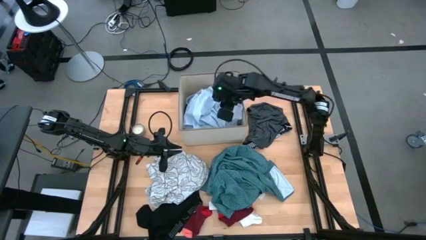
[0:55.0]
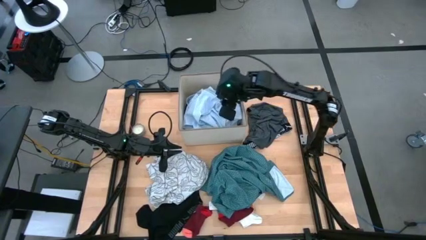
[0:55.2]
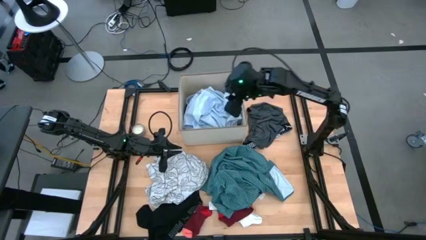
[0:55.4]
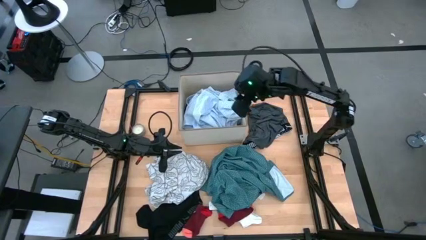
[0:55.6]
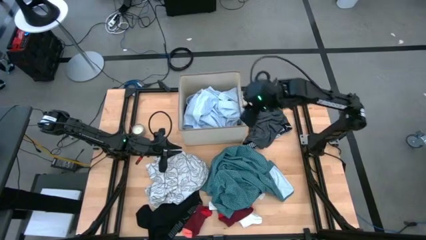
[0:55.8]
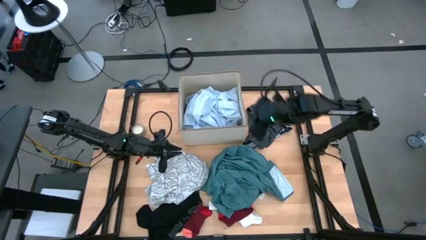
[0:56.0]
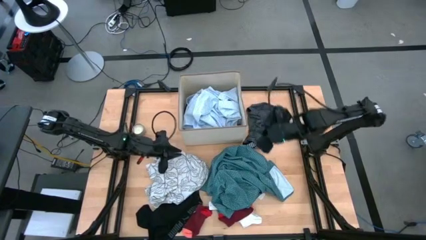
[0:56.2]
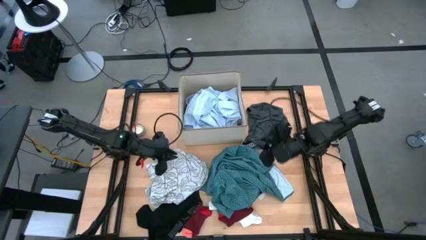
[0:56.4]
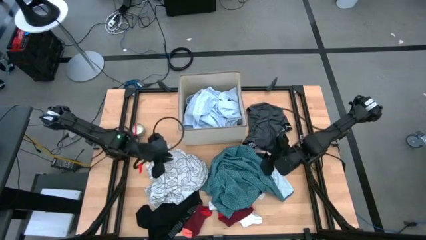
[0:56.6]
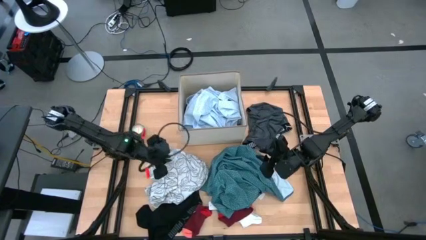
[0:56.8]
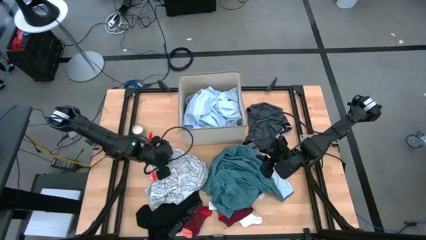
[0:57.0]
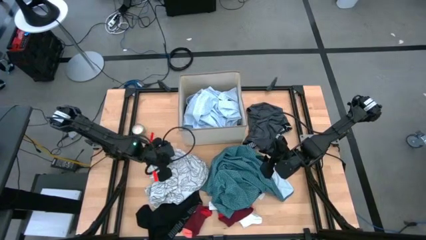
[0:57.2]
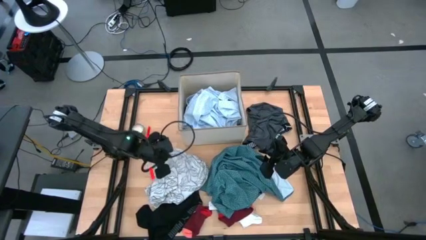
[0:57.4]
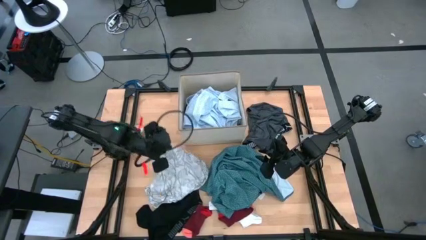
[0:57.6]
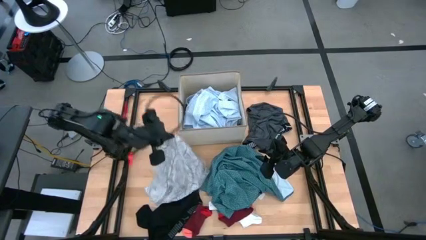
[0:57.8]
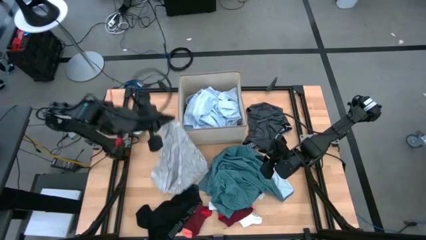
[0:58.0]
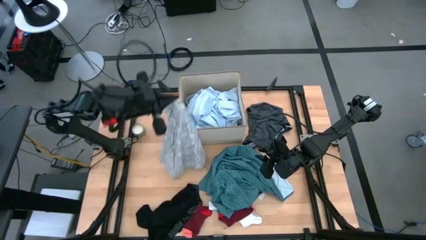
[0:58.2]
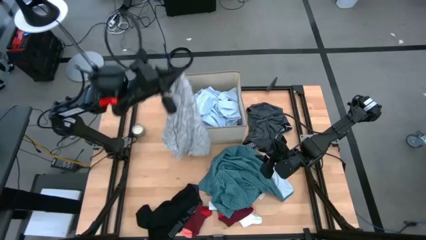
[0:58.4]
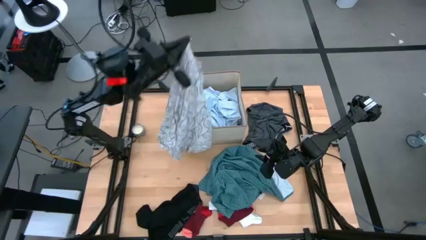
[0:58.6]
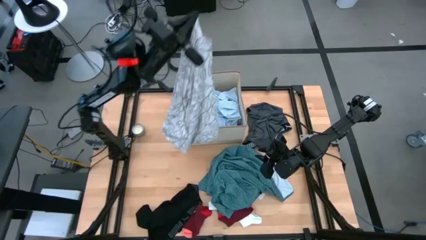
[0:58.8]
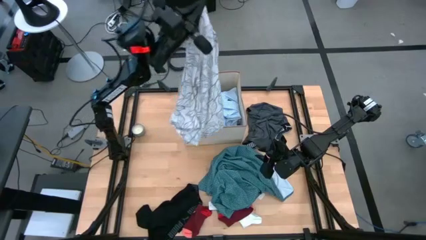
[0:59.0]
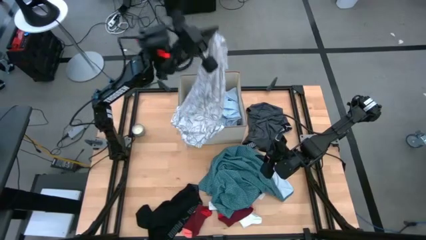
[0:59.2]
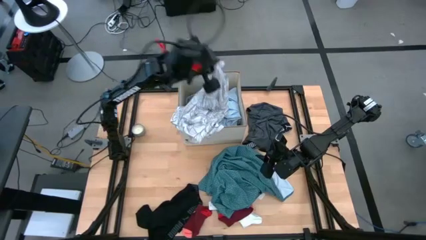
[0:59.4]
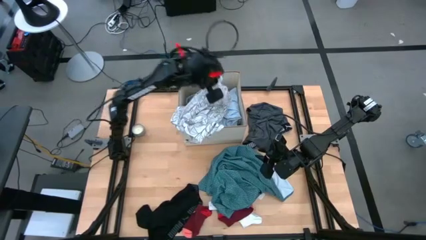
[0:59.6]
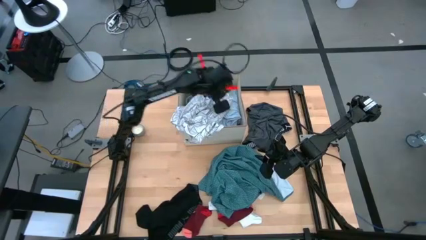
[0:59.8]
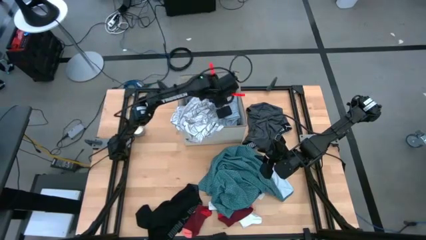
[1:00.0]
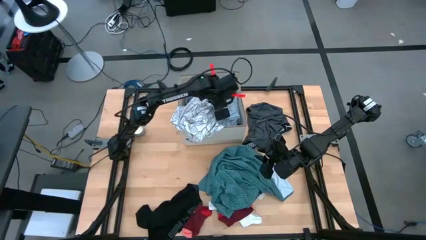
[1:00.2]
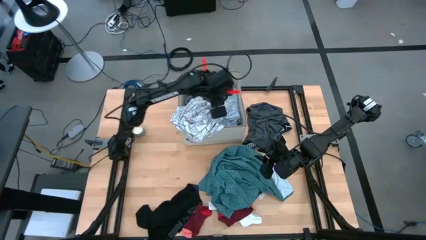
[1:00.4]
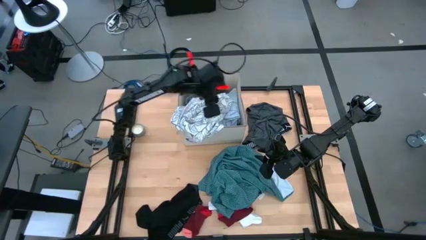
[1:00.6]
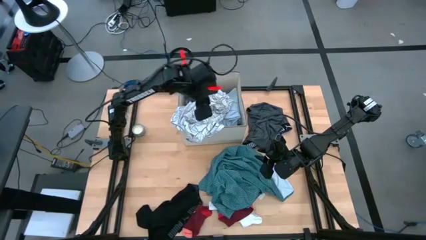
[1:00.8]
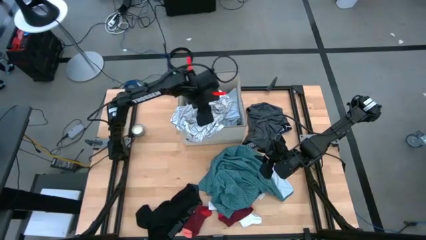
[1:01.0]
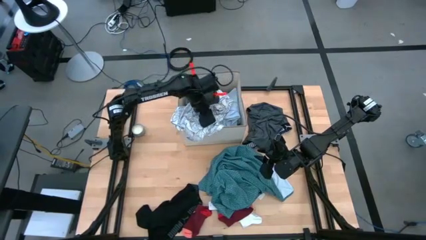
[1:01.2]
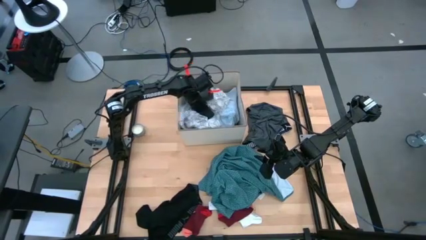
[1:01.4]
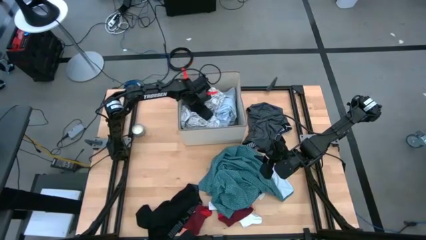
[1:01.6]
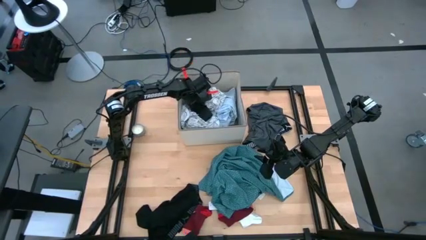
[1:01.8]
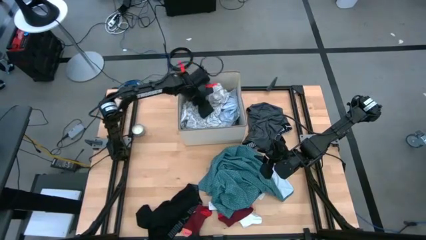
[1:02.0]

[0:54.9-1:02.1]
Task: Sort clothes
Put the white shirt into the laundry organizer

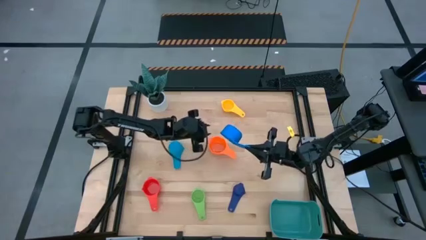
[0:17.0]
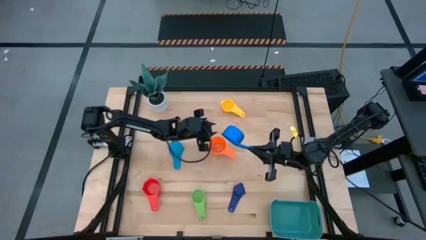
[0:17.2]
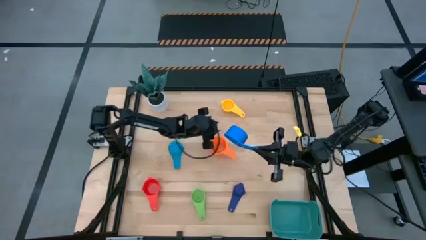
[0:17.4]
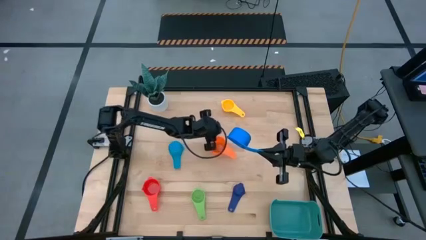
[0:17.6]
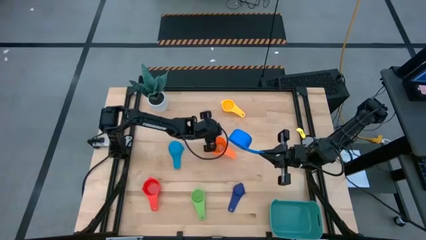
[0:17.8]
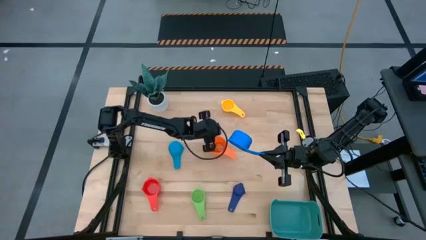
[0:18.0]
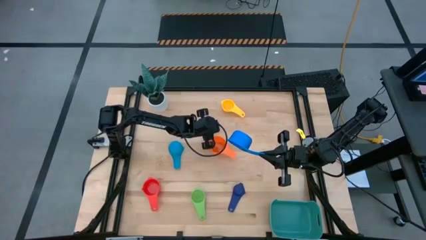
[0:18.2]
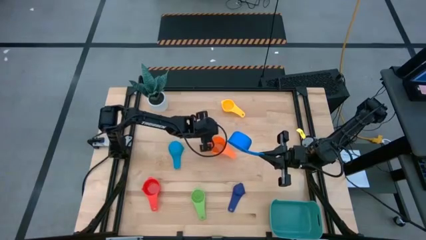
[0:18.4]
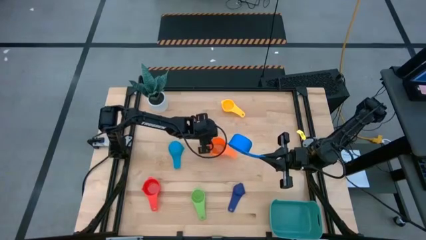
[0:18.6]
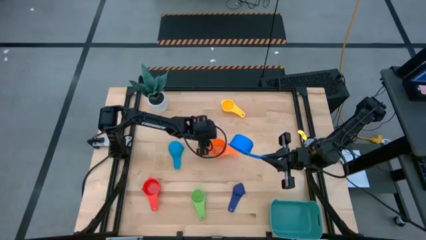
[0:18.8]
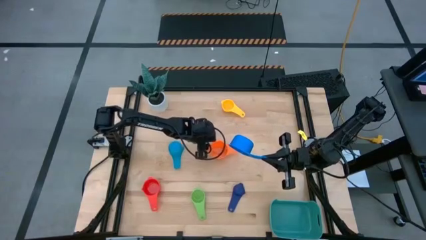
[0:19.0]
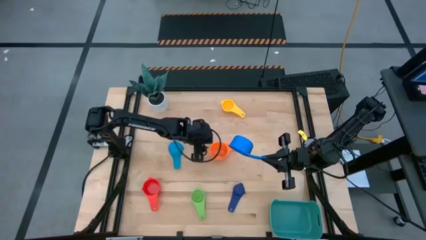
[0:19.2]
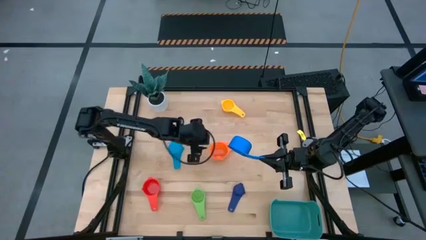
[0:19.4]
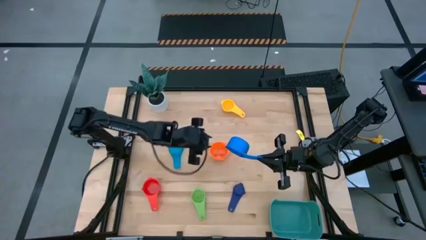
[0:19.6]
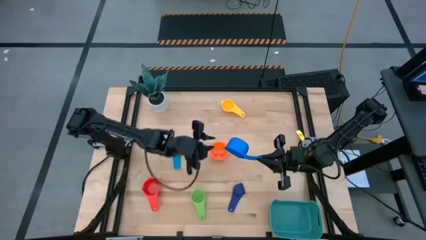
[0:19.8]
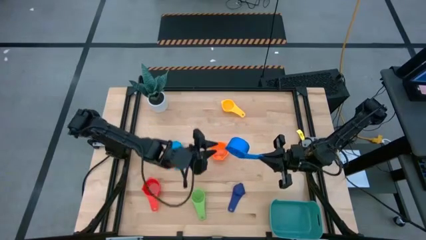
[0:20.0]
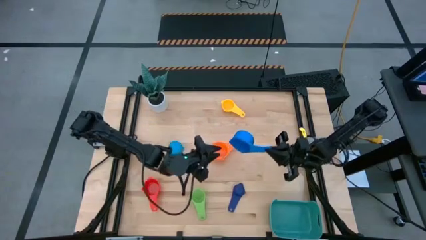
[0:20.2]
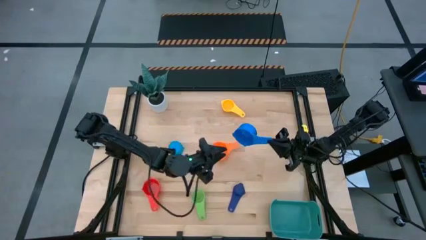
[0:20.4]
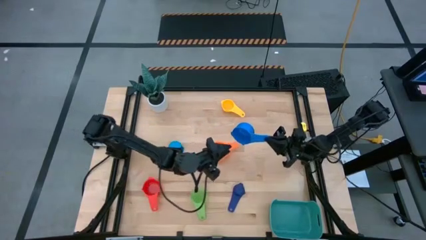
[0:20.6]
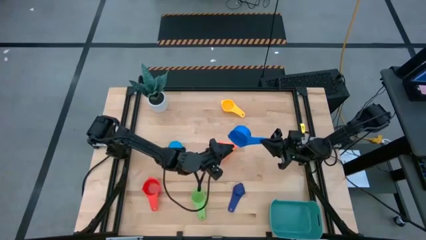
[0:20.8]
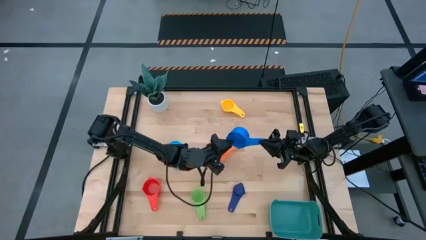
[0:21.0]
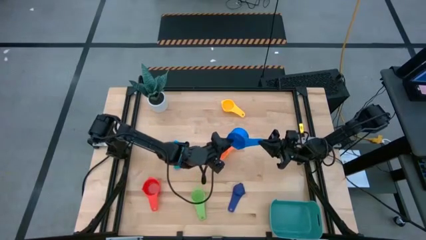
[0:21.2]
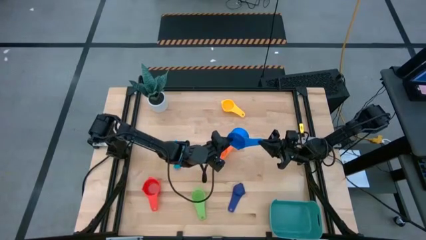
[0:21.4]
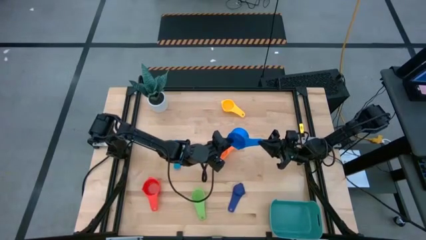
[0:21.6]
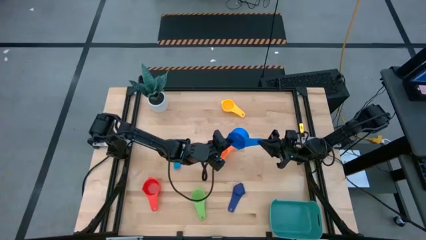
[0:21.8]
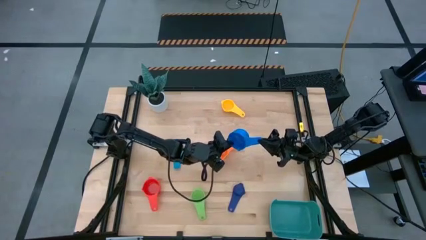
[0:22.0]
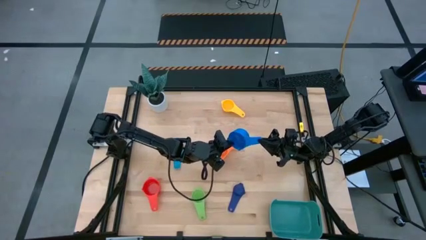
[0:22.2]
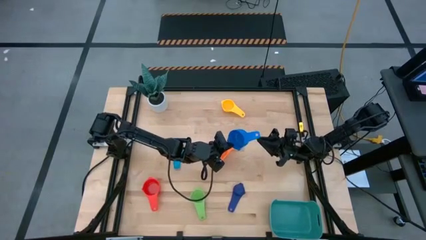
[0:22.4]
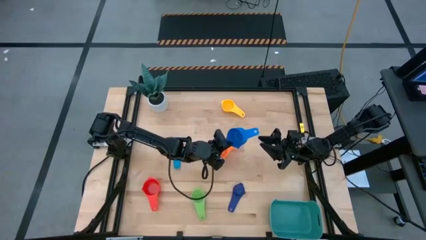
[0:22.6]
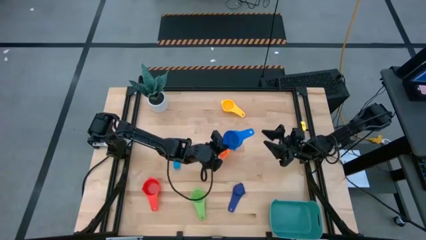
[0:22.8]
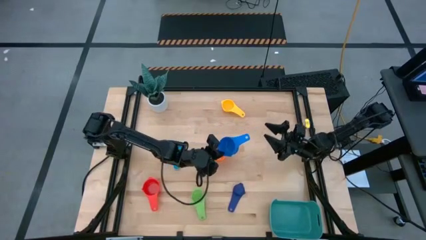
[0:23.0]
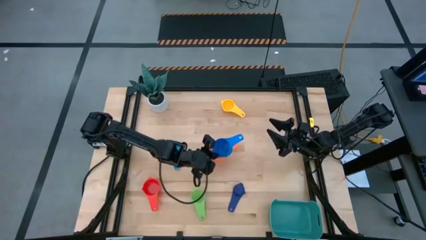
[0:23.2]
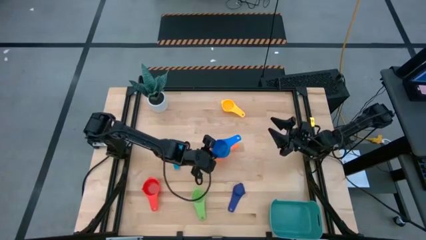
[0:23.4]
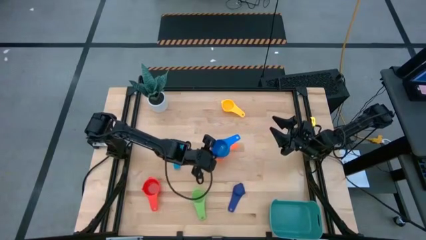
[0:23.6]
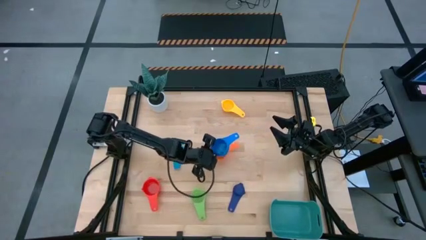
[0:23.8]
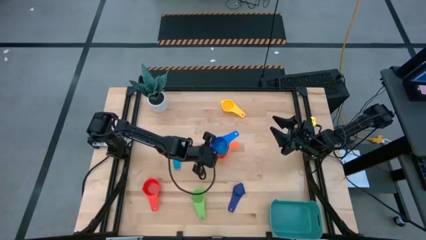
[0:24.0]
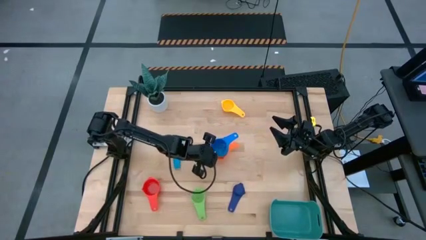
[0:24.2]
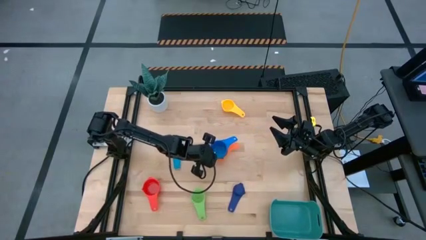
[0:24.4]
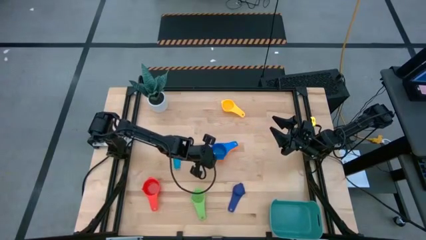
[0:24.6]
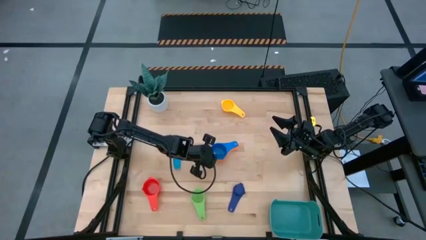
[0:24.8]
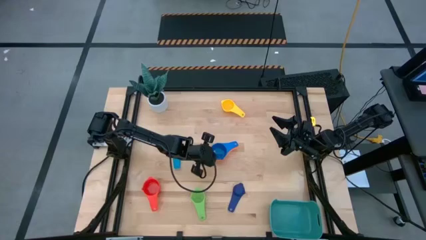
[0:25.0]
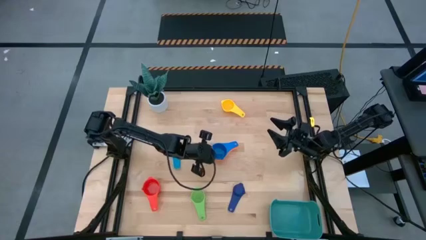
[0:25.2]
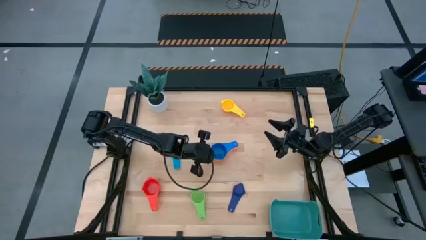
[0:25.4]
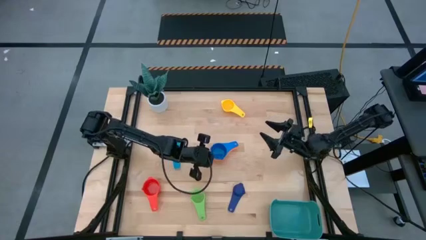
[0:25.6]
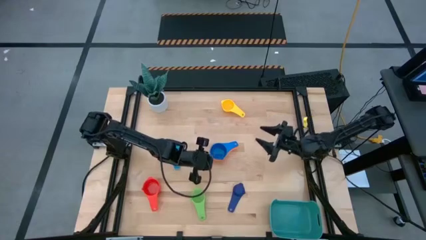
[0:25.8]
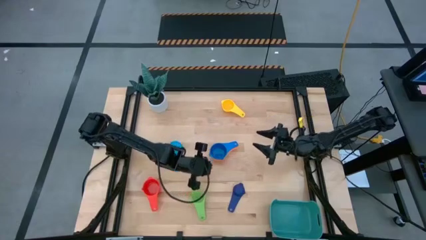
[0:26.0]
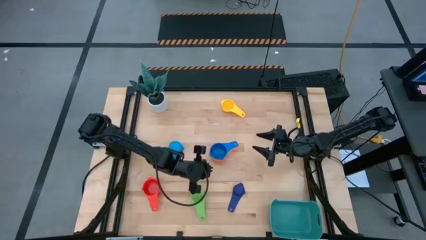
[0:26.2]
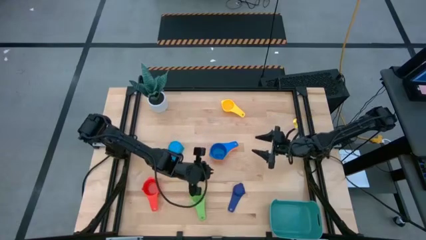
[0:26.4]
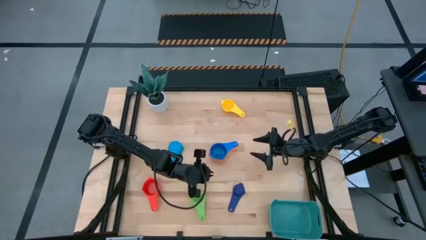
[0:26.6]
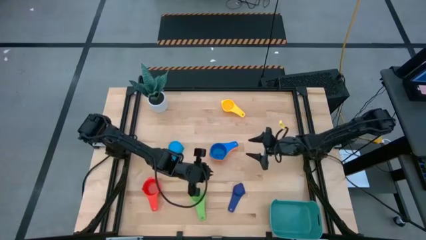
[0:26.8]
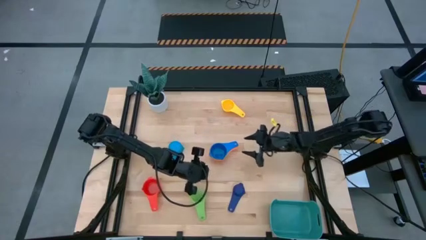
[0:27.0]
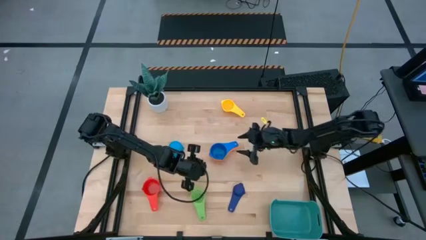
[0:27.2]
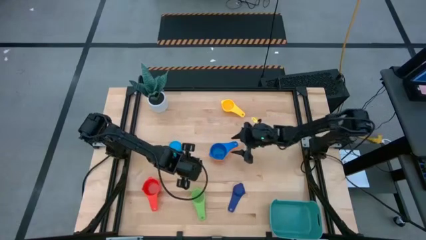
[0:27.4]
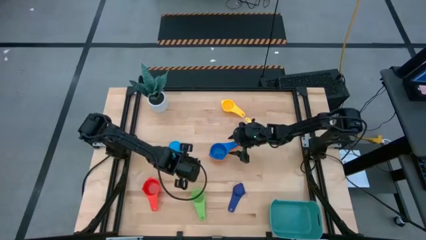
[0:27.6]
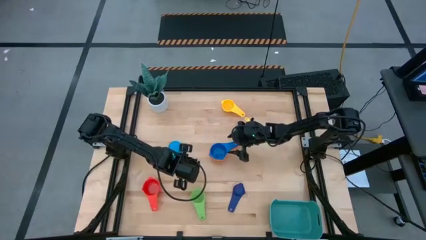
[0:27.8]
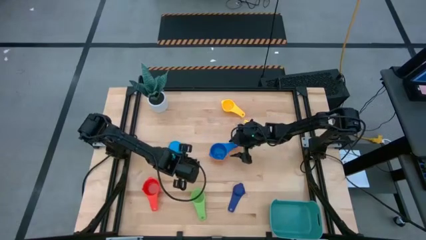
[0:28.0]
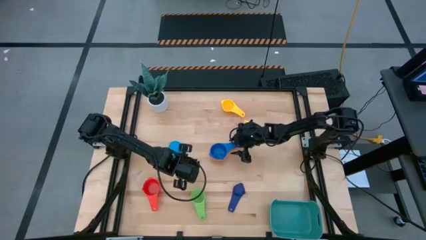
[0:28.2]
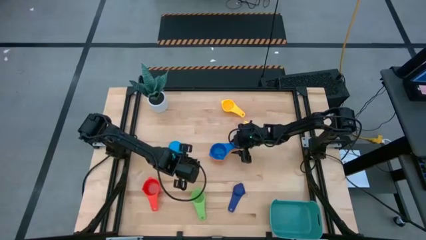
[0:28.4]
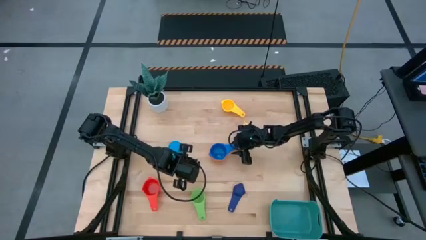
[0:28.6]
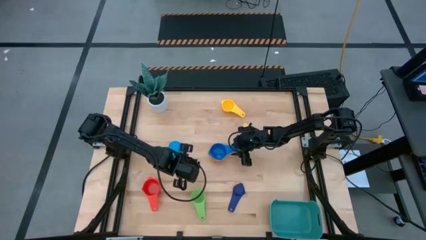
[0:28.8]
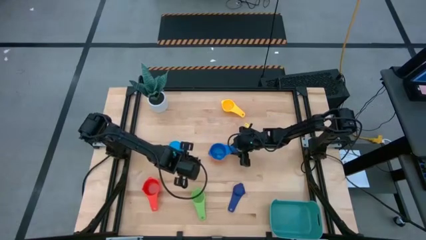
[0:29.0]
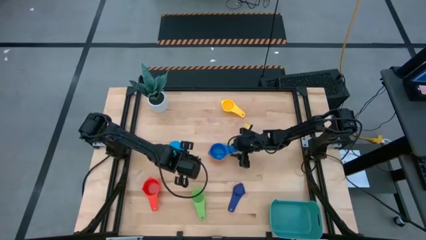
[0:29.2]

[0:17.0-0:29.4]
Task: Nest measuring cups in basket
Stack the blue measuring cup on top of the orange measuring cup
